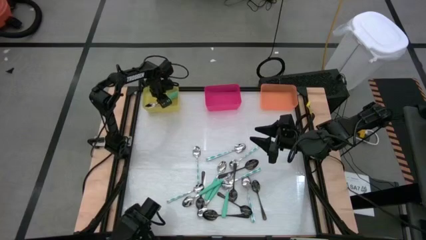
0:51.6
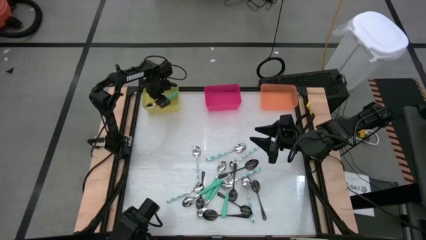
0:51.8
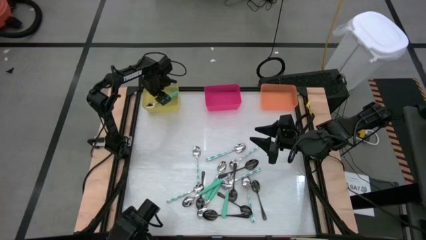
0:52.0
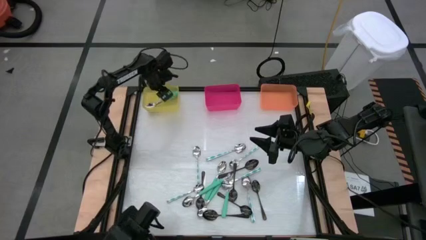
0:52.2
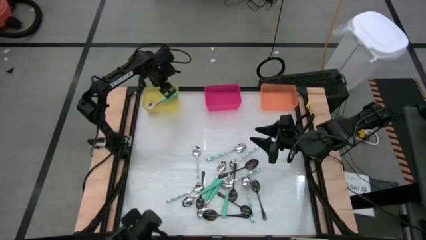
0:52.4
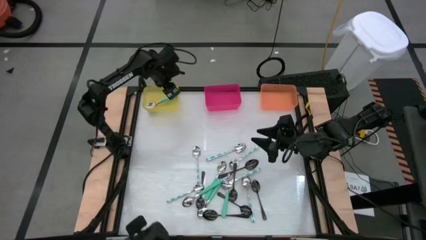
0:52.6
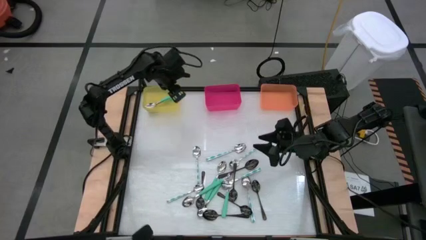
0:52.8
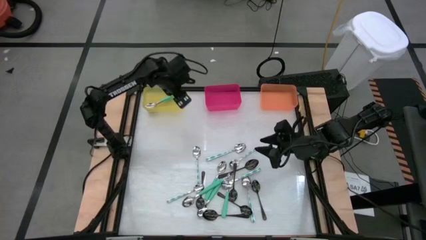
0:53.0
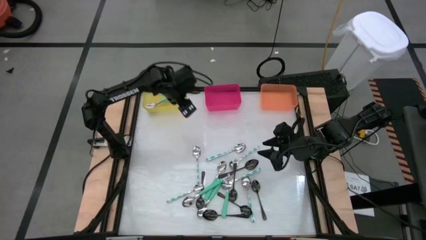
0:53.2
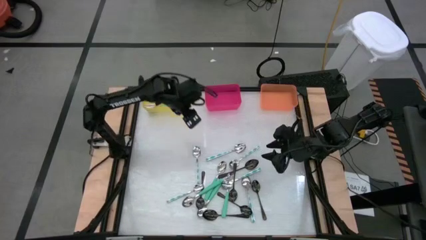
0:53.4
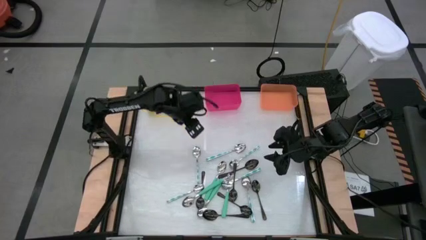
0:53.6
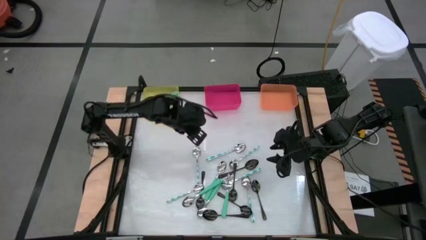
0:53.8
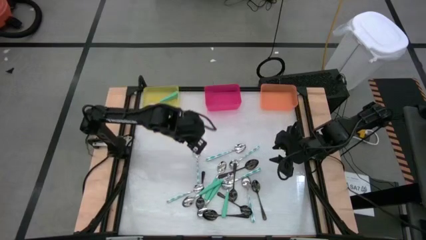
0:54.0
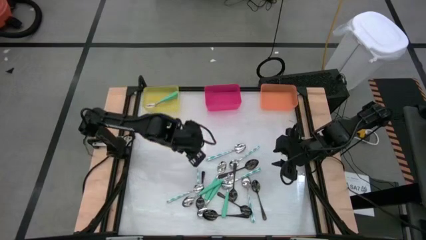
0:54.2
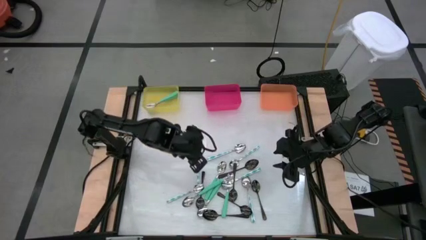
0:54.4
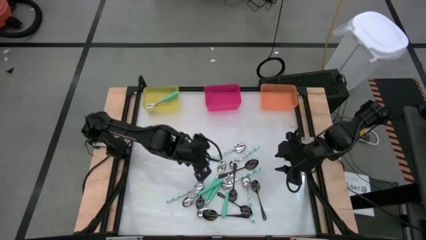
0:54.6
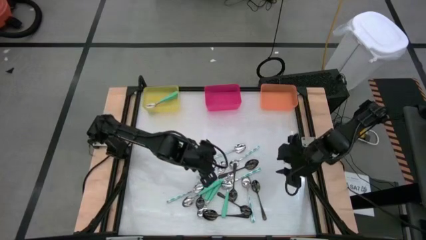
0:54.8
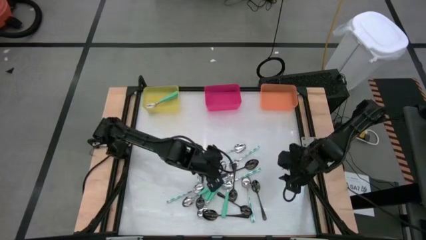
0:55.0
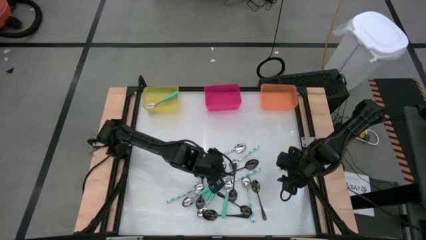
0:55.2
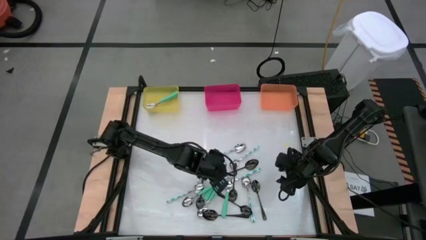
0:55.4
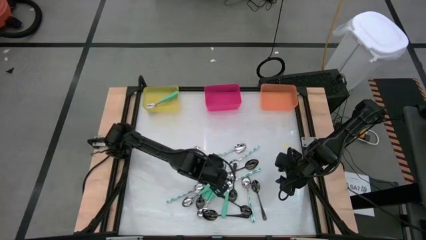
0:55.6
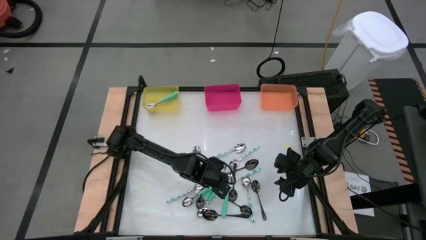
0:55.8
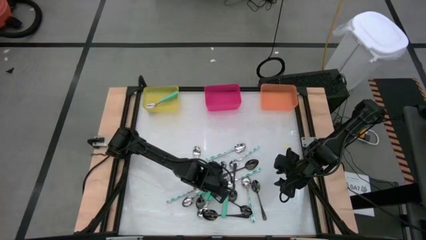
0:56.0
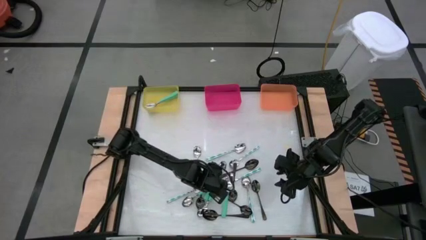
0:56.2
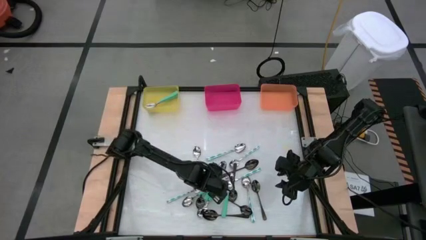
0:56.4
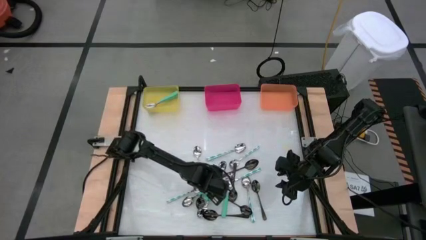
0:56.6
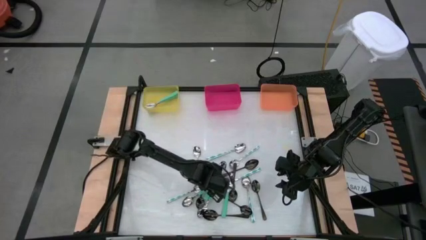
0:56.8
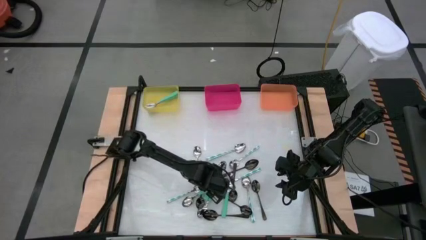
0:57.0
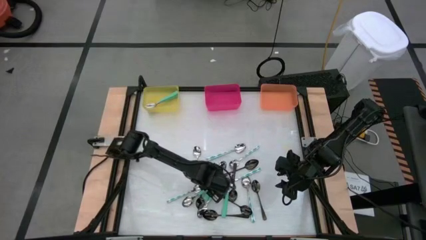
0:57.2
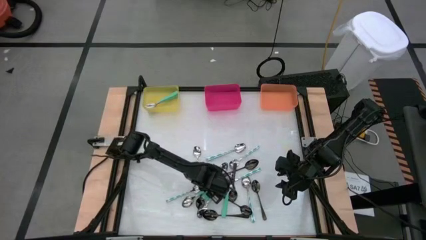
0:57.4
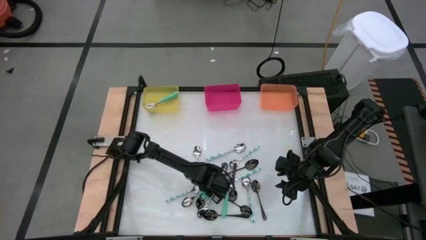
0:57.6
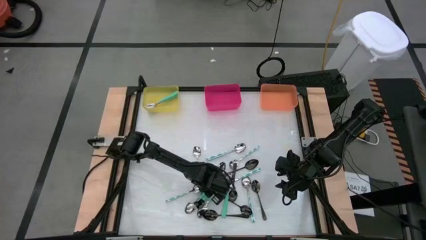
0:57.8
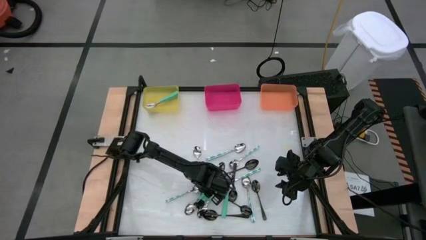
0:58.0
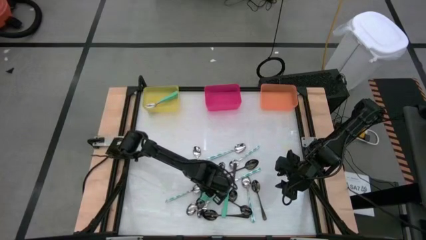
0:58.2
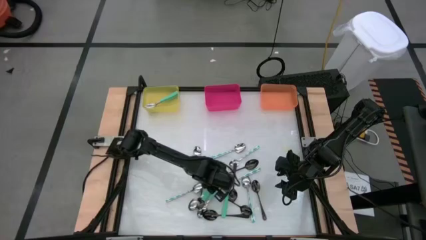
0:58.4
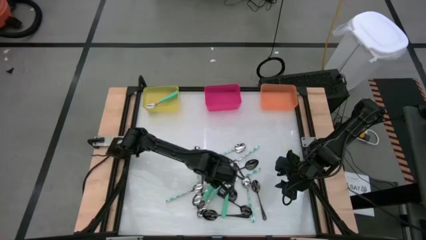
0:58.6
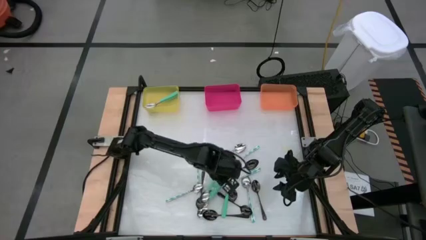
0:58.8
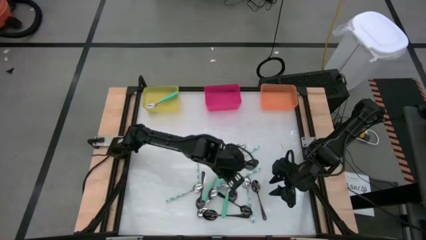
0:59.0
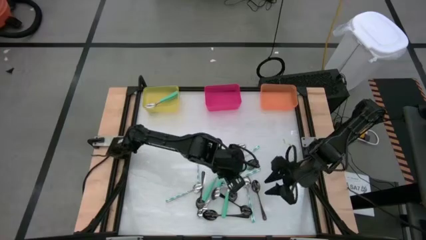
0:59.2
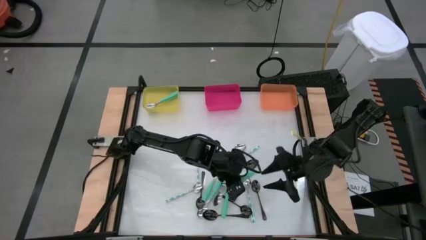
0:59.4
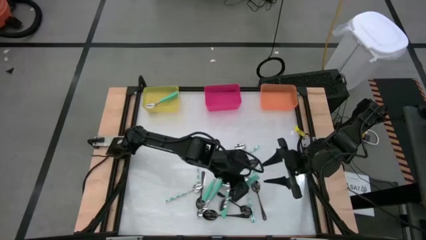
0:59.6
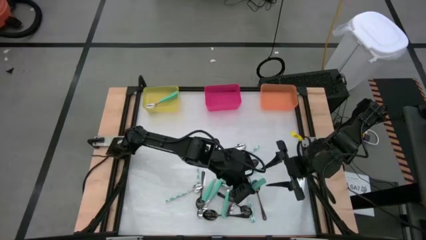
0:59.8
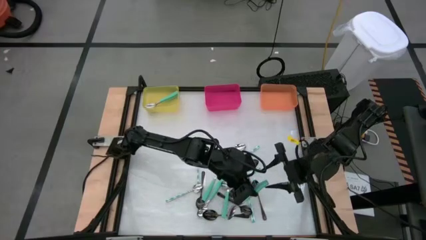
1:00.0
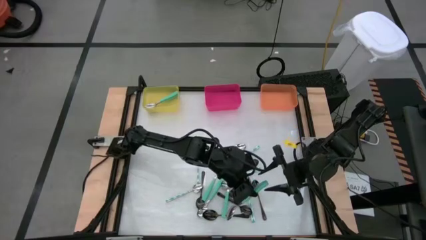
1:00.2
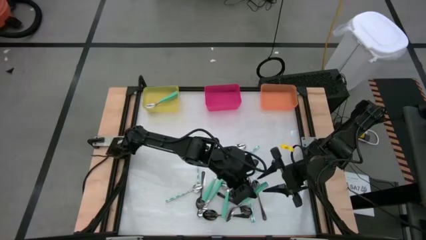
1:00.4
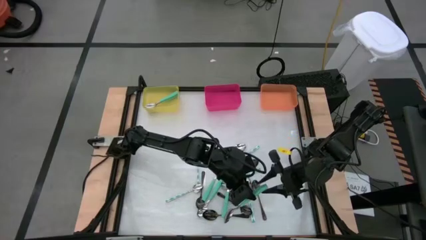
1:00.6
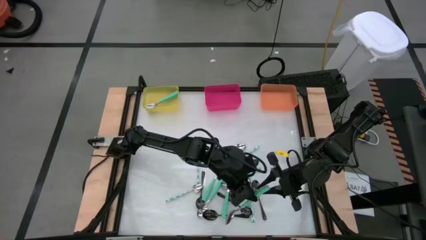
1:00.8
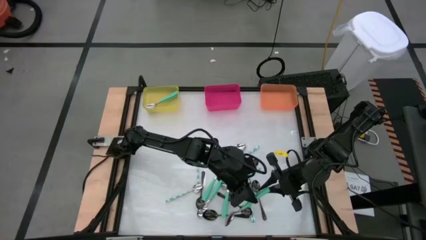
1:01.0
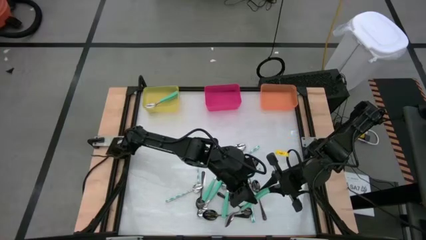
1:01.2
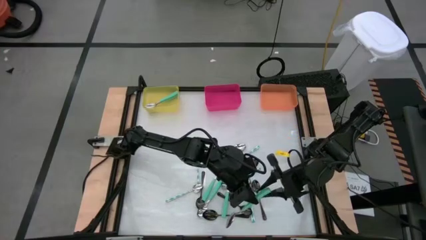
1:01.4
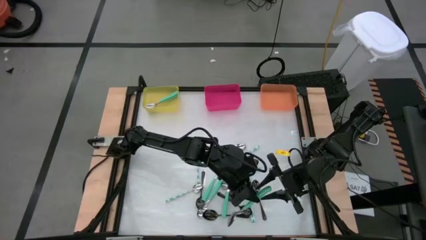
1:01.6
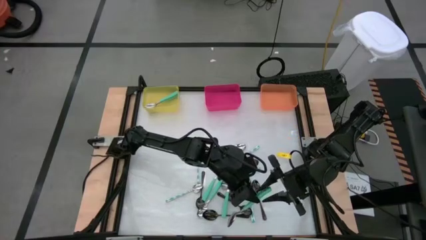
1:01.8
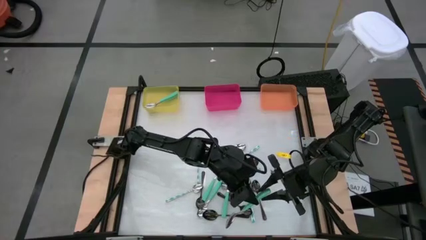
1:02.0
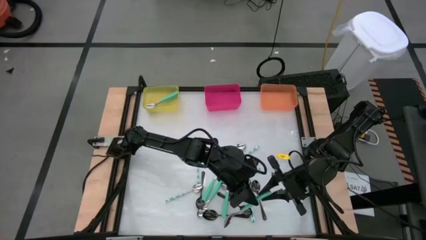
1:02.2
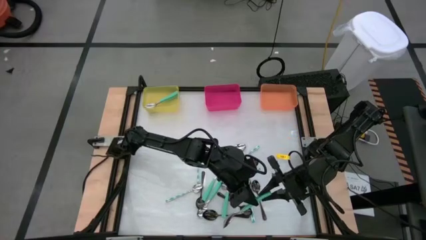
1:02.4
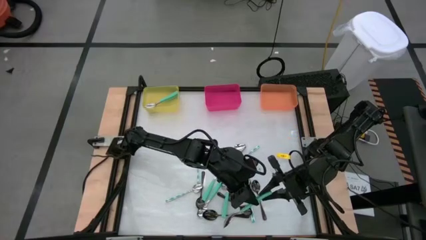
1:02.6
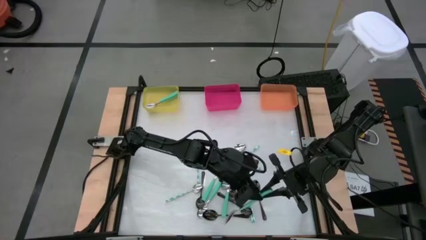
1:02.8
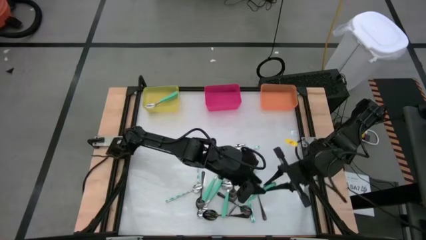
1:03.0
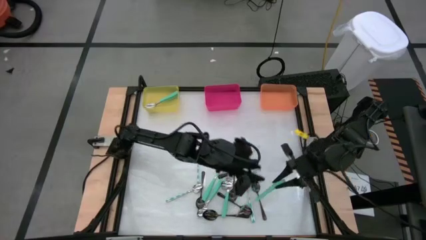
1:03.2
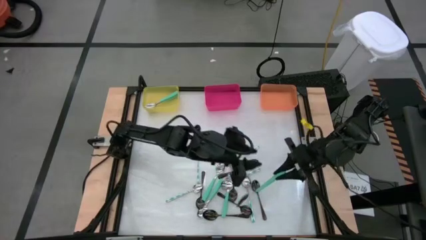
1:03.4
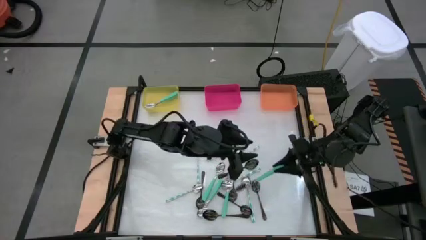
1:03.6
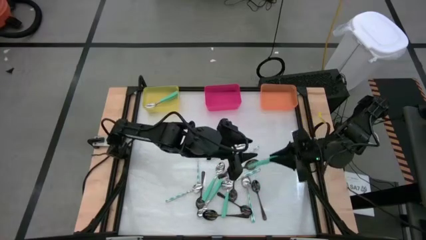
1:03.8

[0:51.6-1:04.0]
Task: Sort silverware by color (type)
Put the light green spoon into the yellow bin
